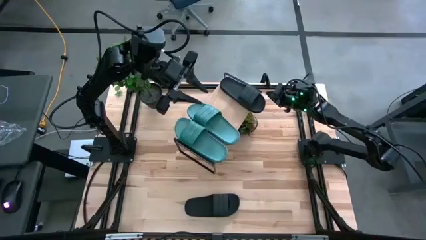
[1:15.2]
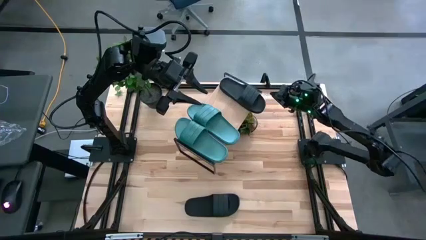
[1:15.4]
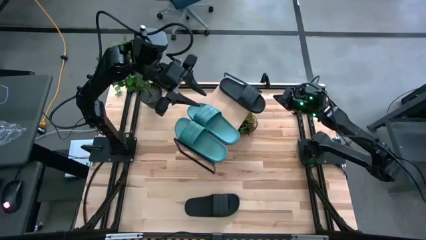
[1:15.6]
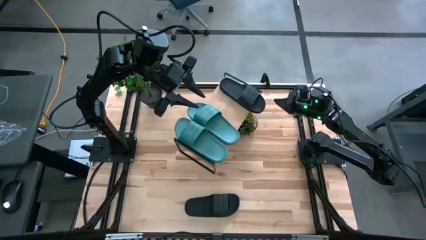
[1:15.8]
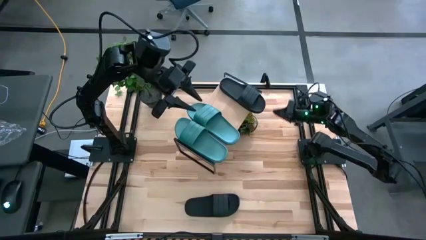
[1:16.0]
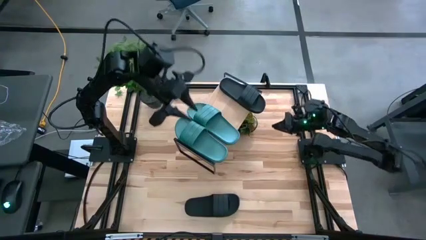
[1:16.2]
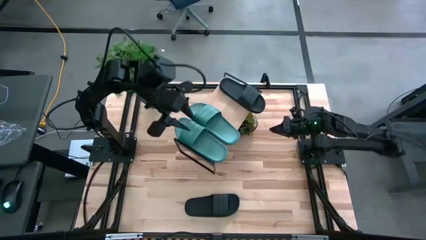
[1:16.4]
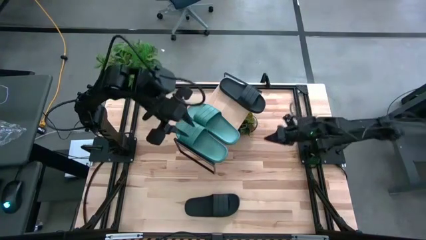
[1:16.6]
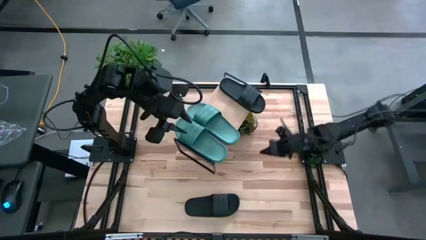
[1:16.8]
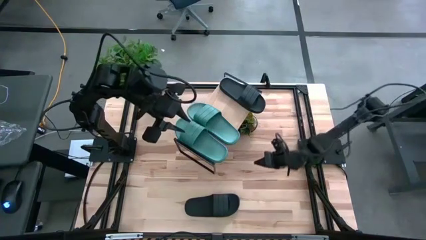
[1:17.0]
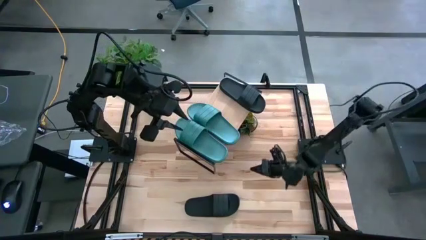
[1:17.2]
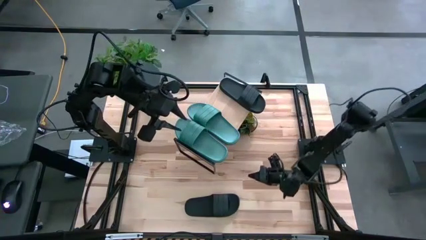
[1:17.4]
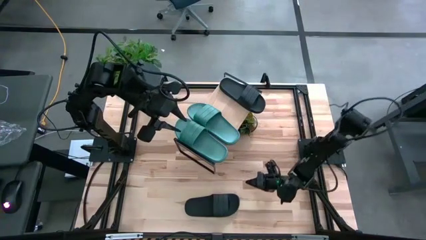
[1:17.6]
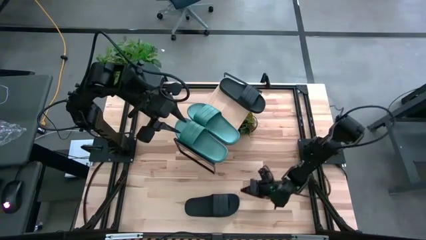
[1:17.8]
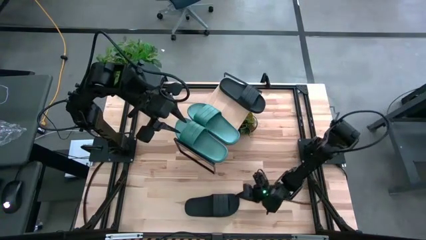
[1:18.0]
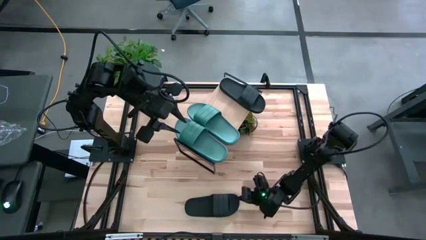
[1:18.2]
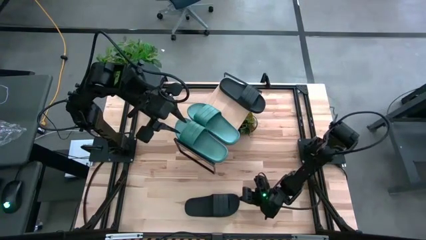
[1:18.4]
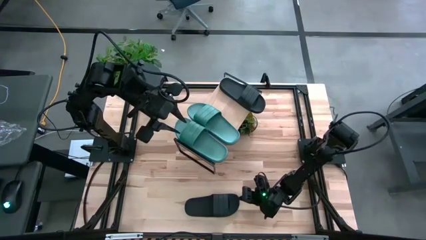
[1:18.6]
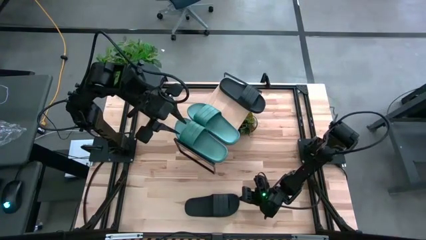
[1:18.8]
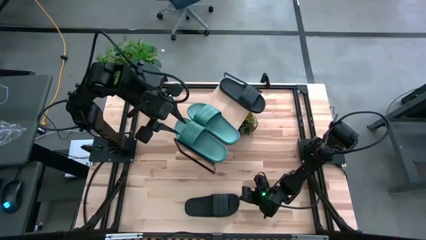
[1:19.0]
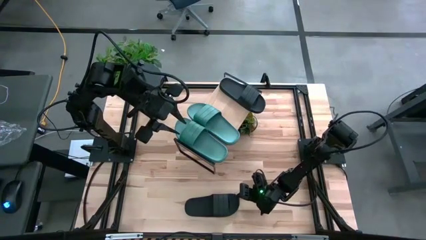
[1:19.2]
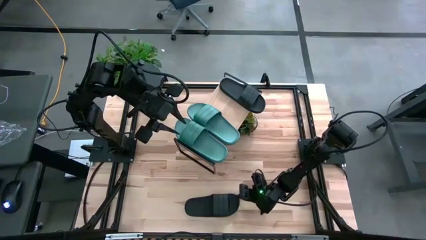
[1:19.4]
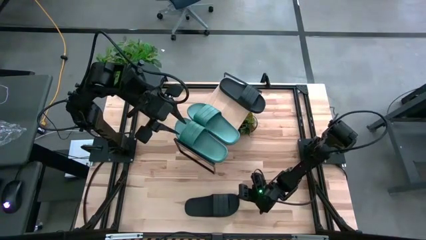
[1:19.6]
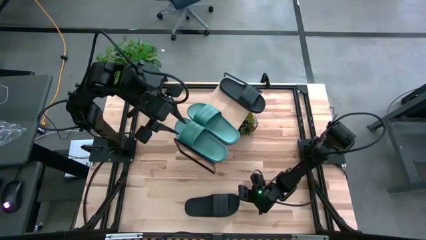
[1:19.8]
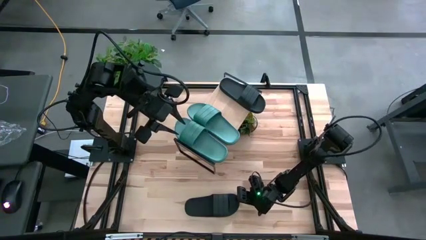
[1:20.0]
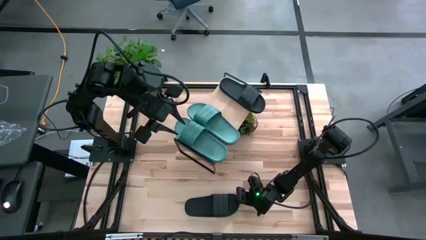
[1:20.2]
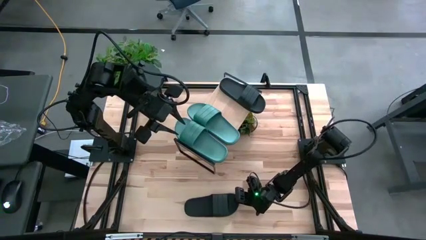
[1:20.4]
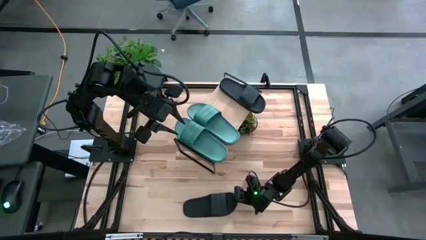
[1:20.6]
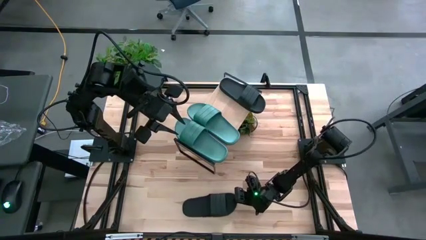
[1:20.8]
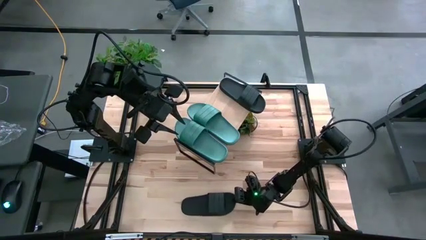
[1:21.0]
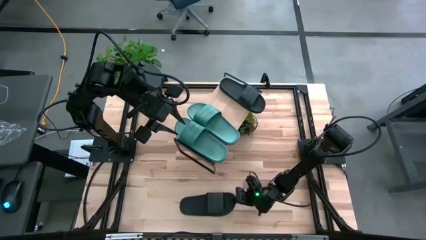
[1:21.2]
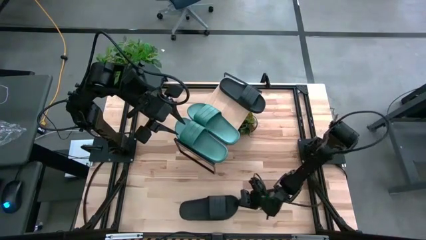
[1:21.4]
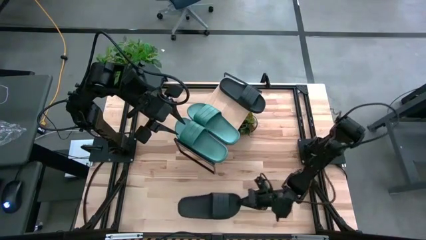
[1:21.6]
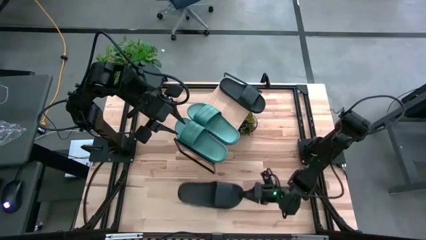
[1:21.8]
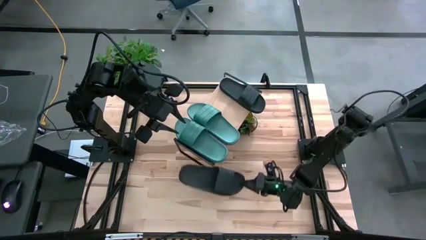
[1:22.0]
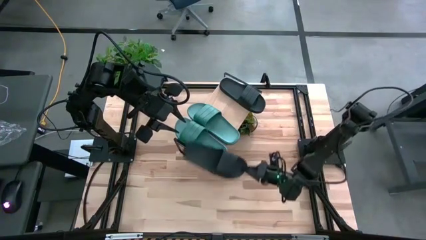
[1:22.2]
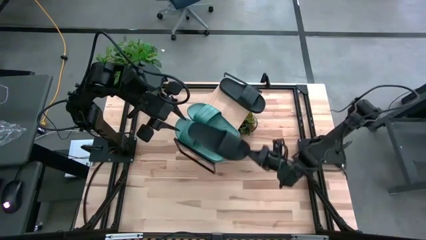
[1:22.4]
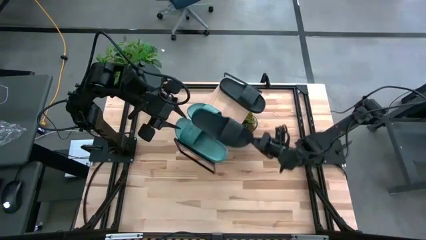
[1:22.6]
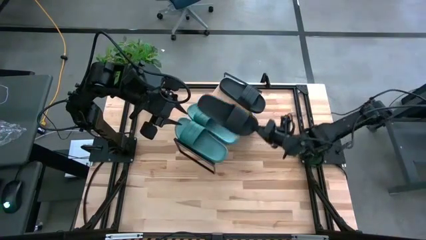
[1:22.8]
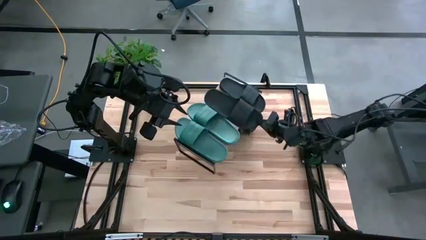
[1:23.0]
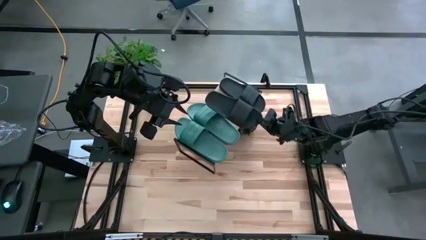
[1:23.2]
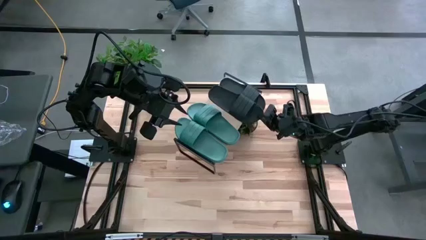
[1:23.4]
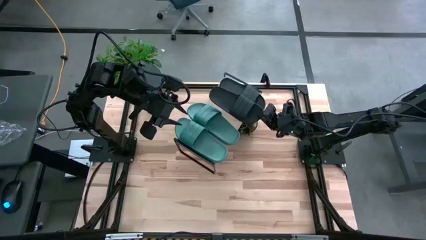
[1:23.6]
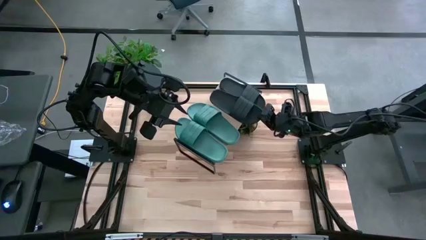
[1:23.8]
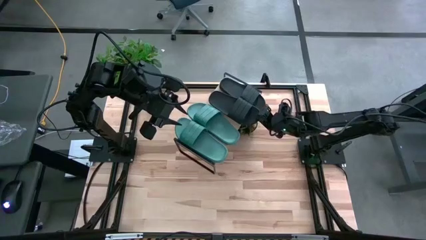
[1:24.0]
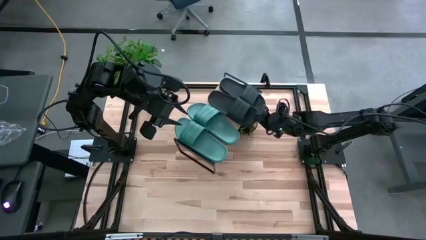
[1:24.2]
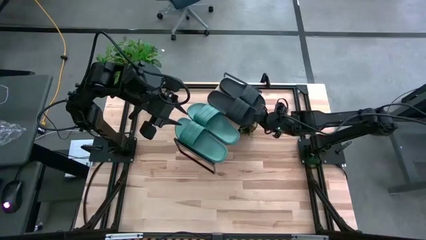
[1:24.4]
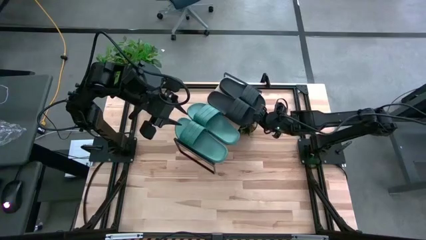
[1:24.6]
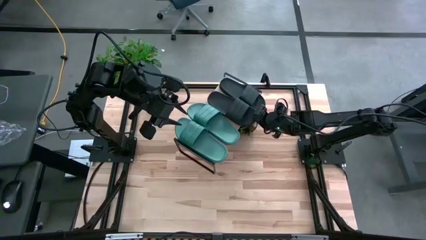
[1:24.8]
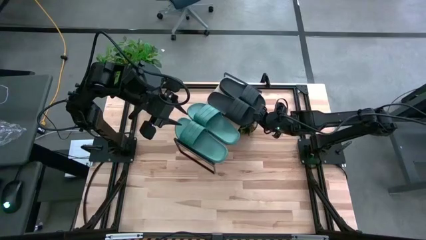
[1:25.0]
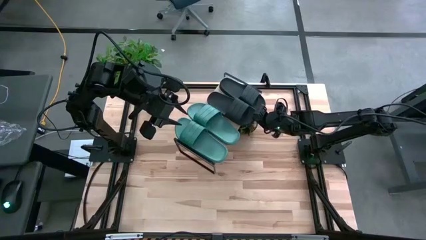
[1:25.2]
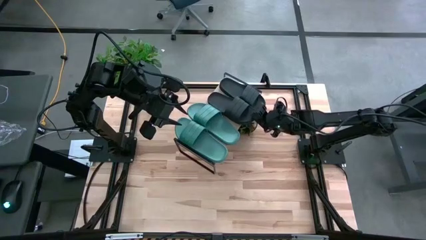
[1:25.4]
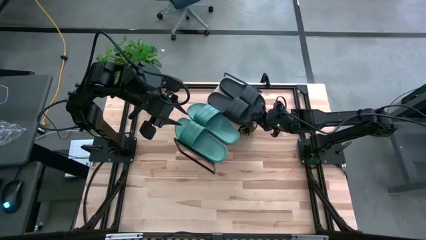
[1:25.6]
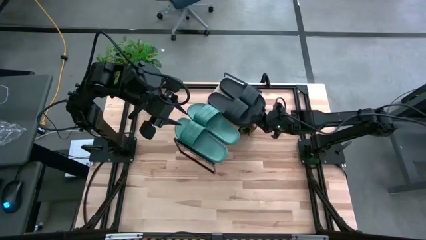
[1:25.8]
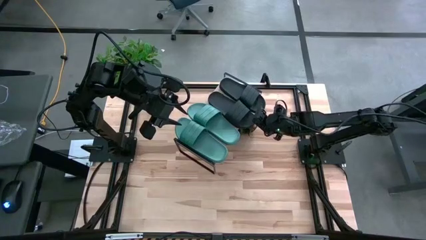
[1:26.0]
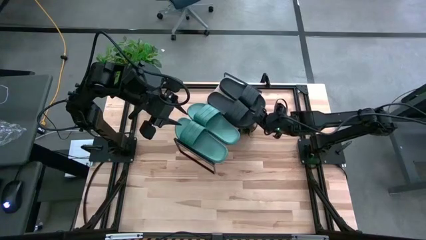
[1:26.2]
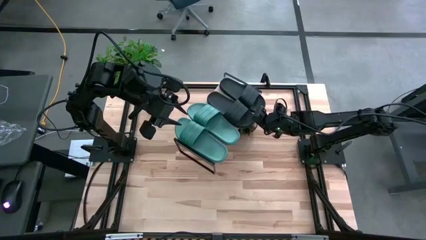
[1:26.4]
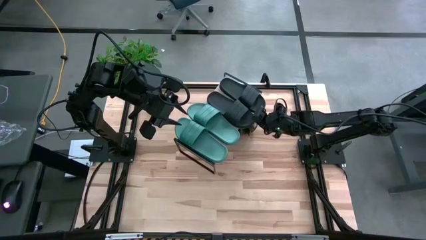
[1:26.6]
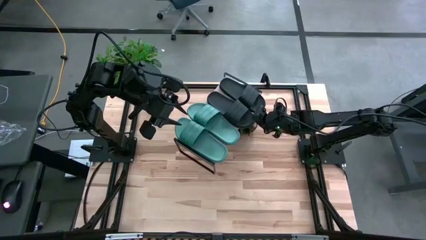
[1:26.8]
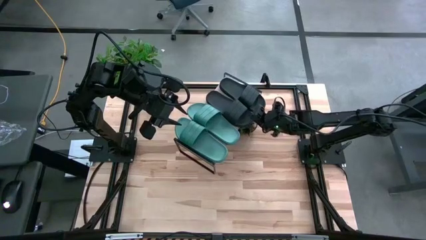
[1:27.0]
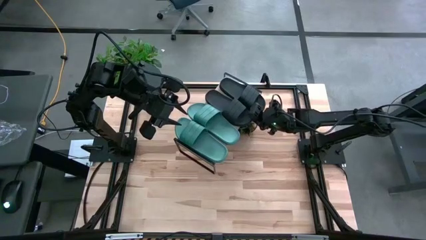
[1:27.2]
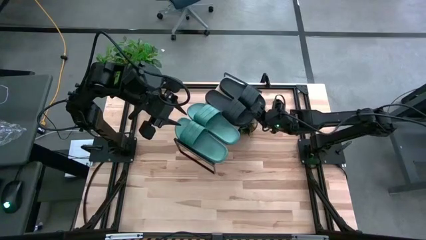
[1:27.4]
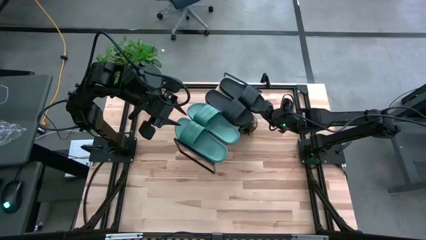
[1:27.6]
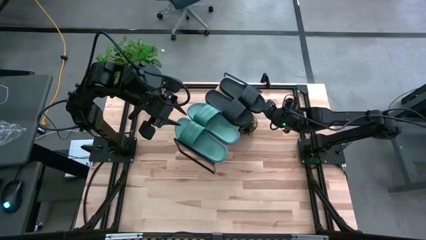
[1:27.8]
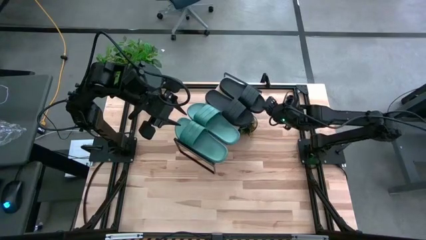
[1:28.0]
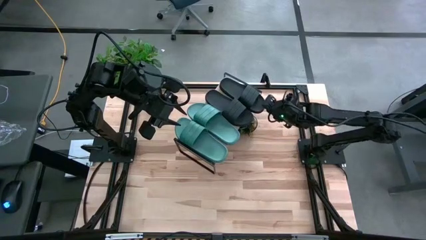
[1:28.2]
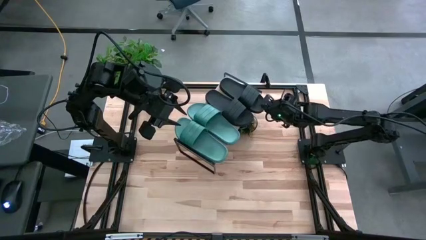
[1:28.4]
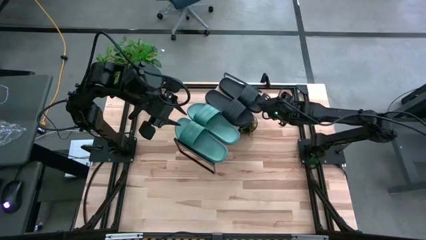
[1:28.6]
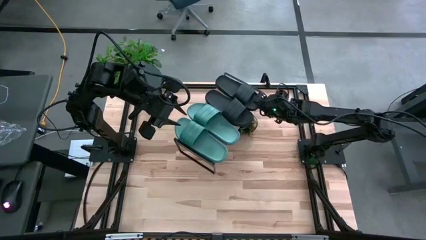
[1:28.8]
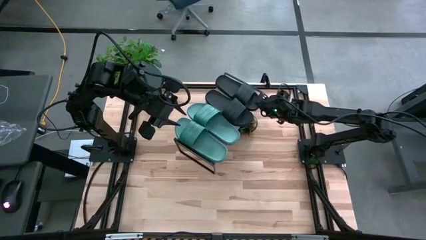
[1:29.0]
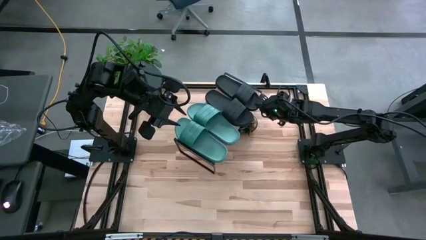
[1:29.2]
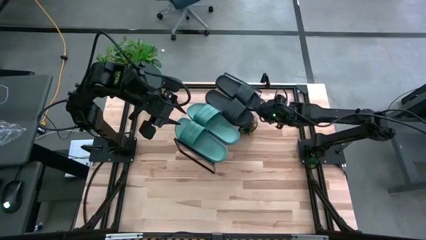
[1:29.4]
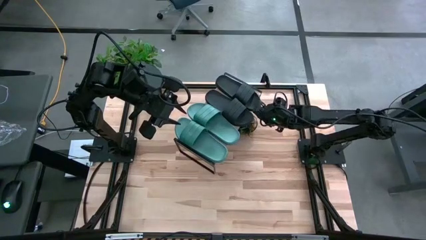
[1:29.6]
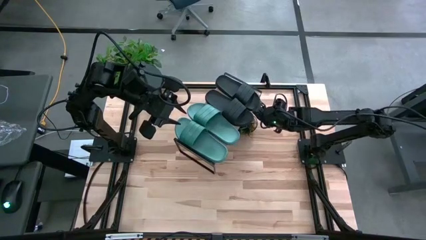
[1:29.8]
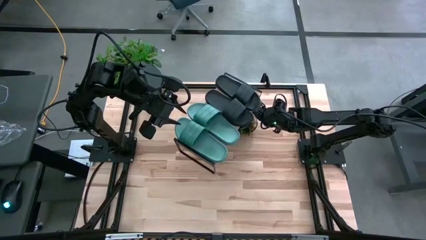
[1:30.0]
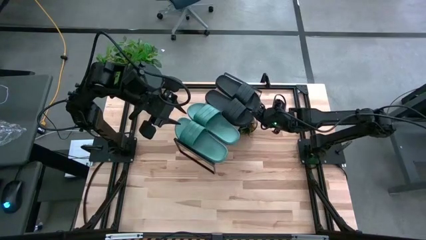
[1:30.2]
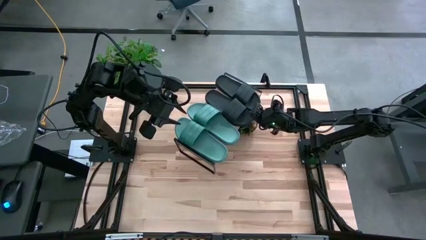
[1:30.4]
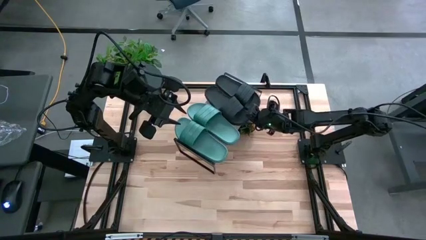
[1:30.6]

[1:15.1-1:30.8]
Task: Pick and place slides into the shelf
Put the black slide on the shelf
